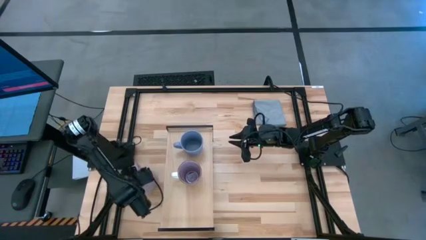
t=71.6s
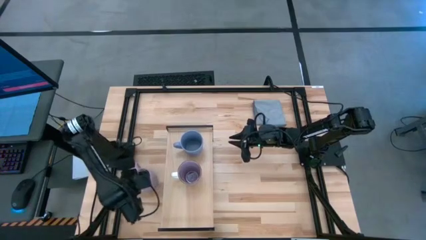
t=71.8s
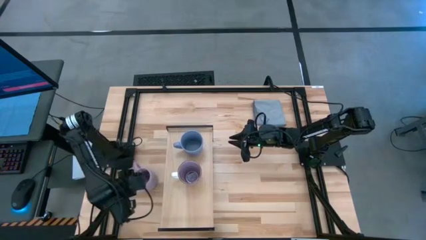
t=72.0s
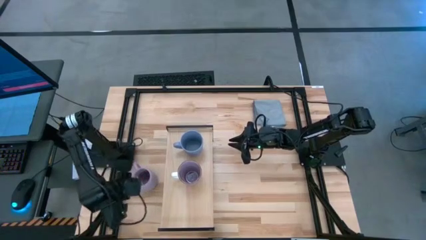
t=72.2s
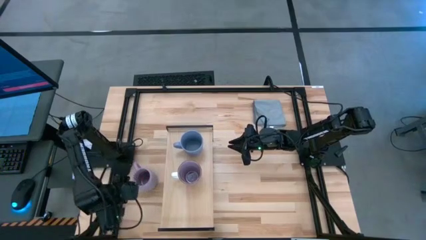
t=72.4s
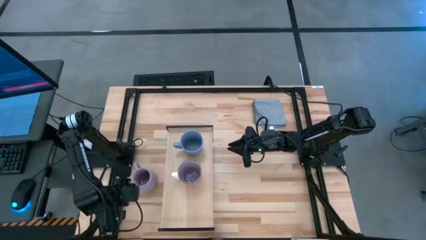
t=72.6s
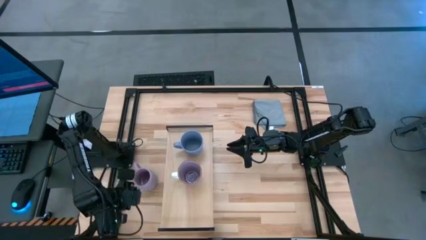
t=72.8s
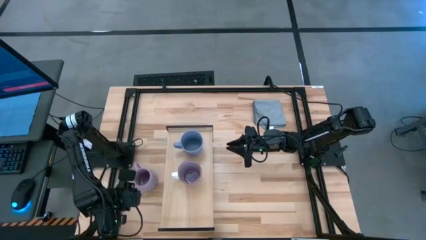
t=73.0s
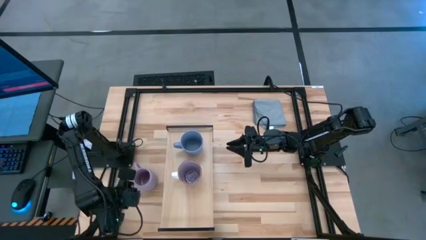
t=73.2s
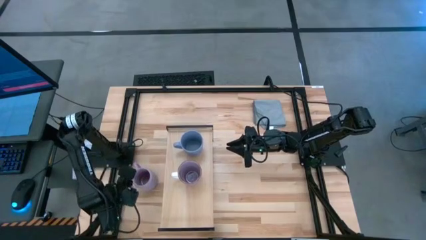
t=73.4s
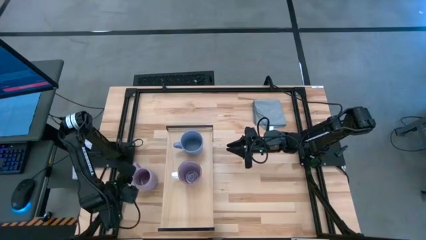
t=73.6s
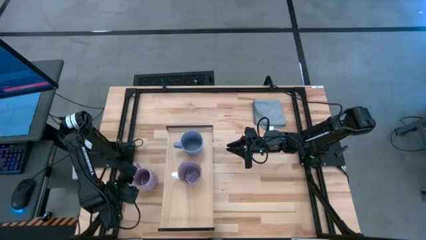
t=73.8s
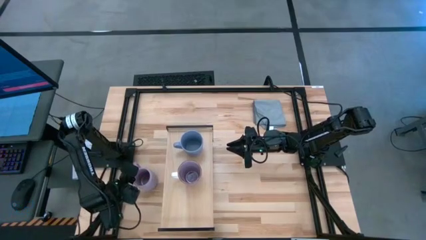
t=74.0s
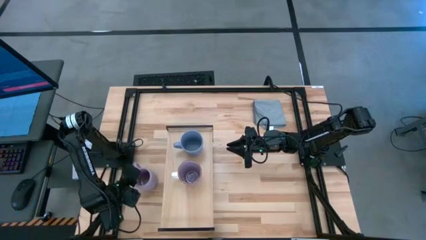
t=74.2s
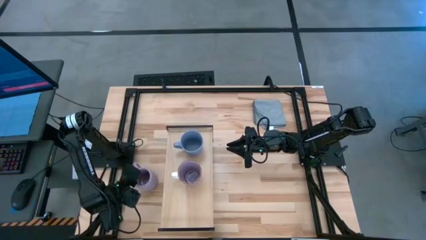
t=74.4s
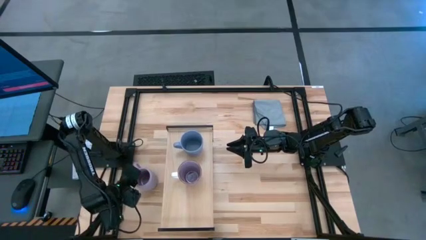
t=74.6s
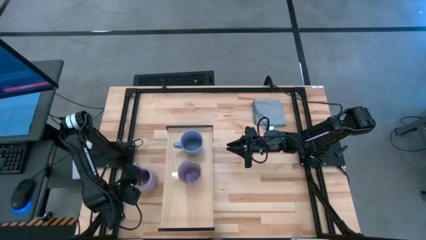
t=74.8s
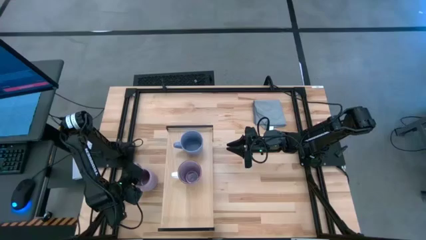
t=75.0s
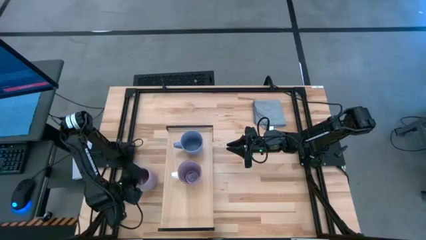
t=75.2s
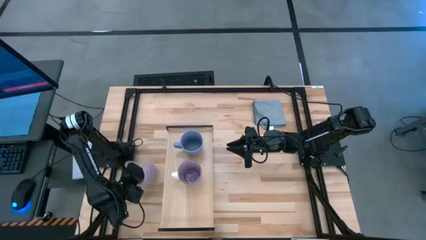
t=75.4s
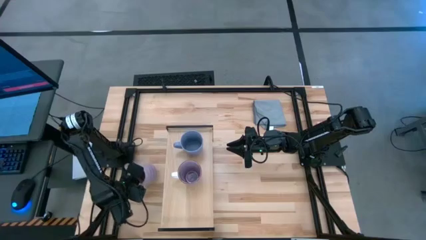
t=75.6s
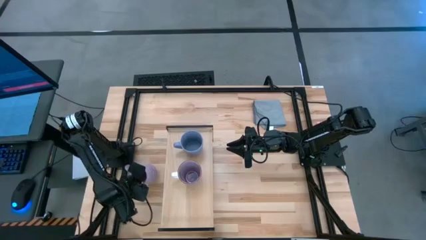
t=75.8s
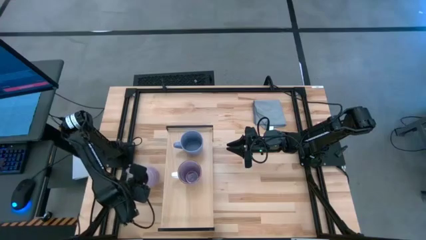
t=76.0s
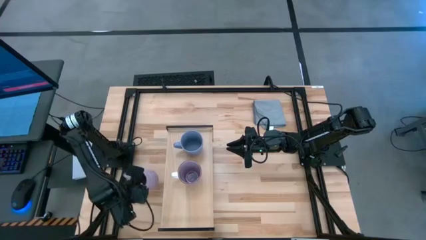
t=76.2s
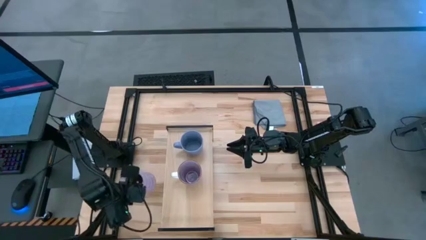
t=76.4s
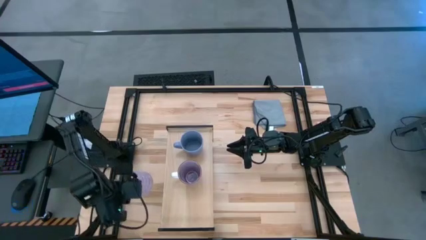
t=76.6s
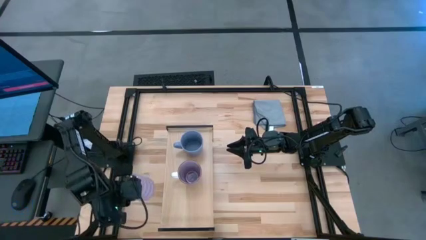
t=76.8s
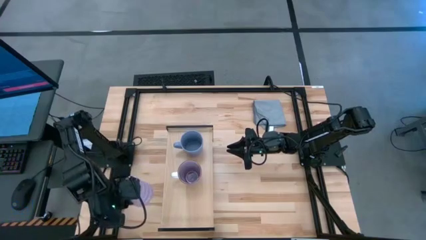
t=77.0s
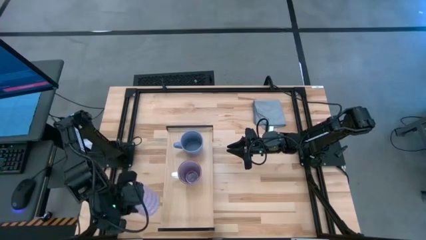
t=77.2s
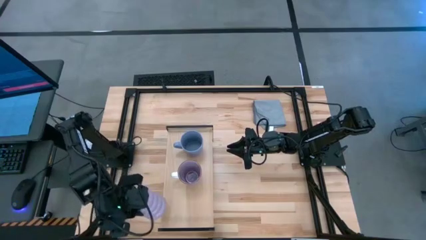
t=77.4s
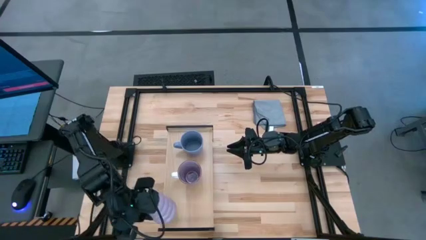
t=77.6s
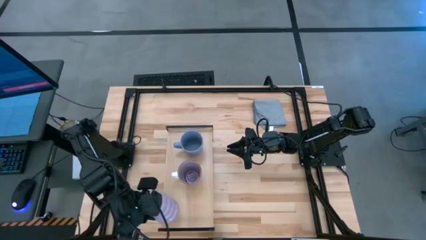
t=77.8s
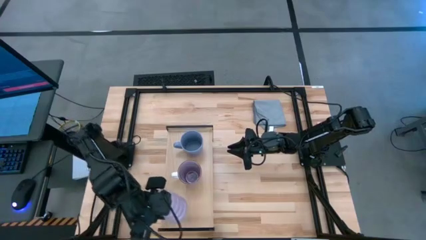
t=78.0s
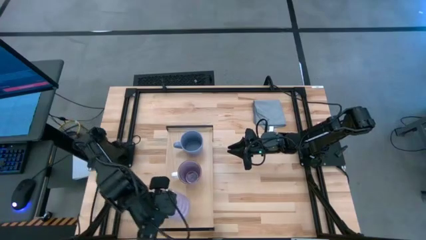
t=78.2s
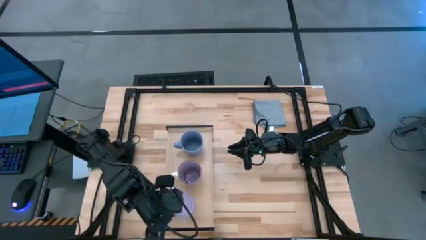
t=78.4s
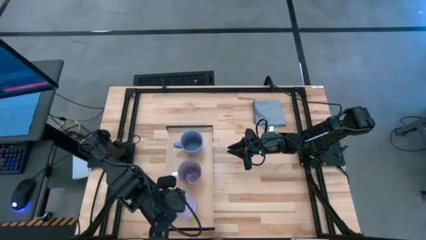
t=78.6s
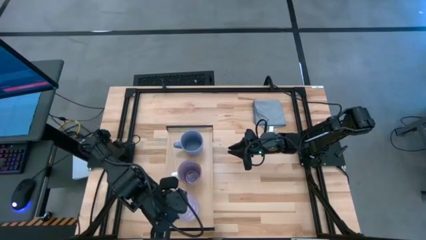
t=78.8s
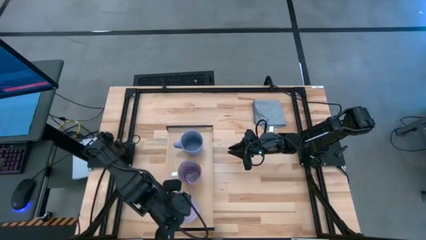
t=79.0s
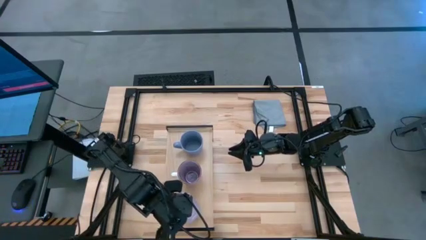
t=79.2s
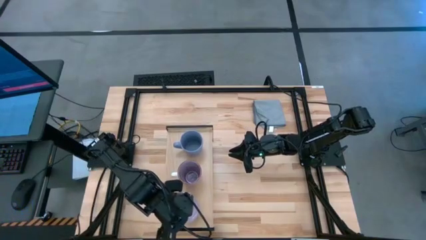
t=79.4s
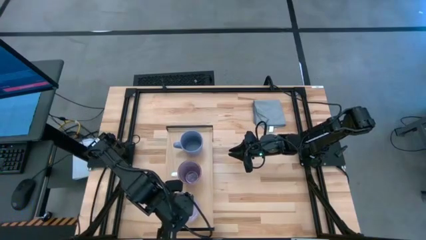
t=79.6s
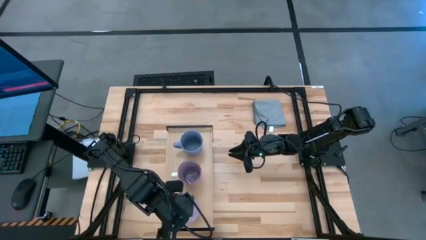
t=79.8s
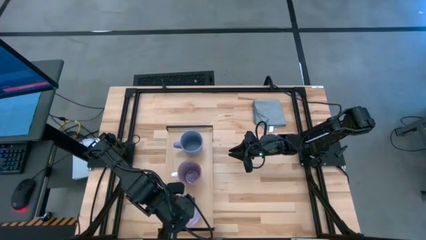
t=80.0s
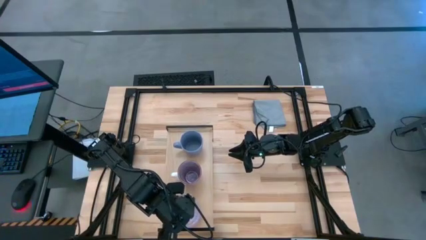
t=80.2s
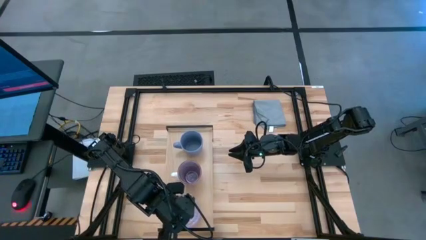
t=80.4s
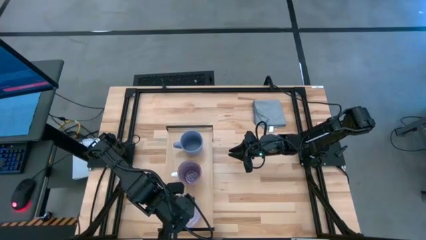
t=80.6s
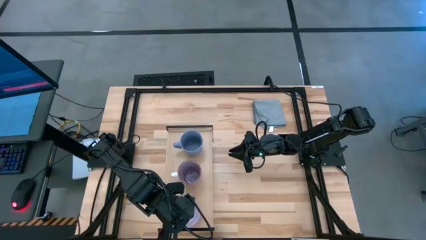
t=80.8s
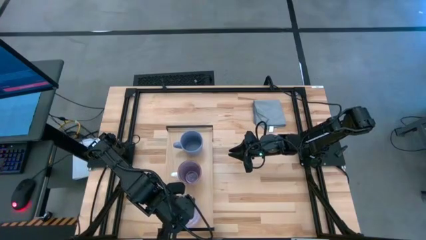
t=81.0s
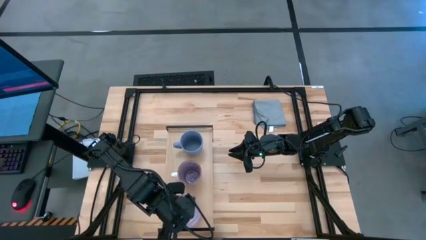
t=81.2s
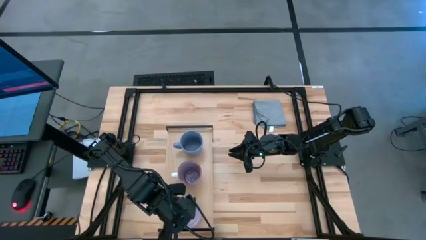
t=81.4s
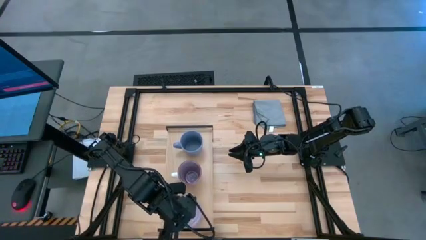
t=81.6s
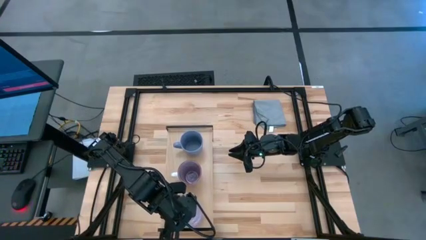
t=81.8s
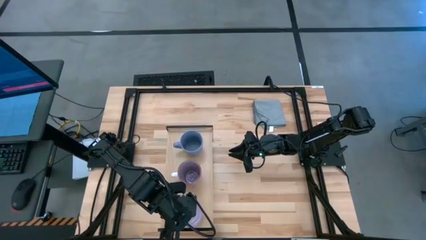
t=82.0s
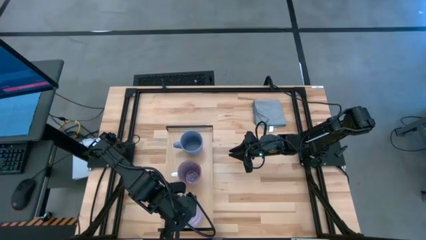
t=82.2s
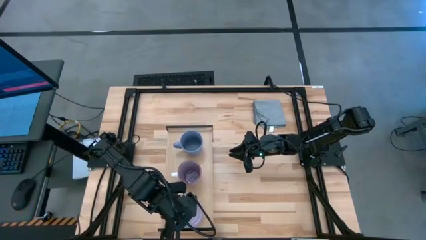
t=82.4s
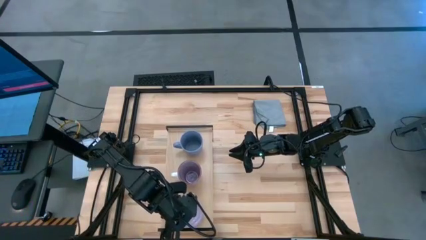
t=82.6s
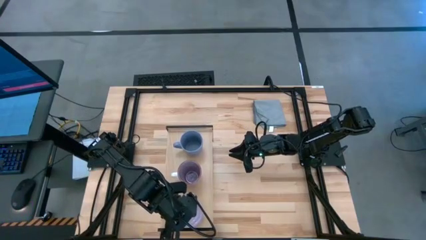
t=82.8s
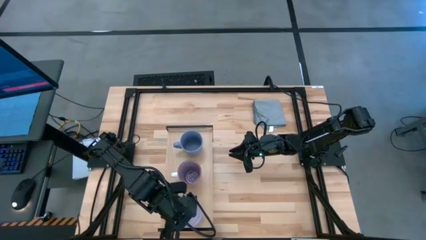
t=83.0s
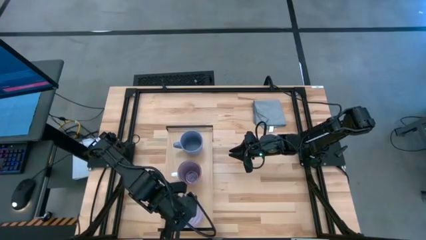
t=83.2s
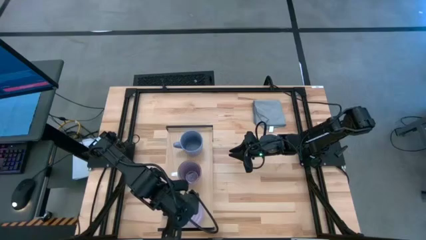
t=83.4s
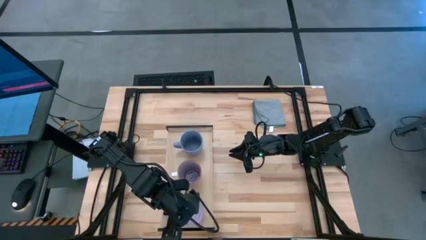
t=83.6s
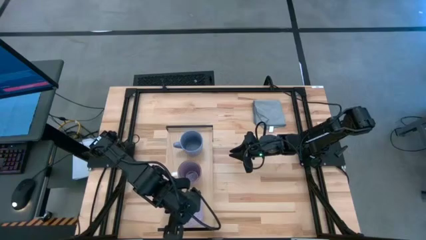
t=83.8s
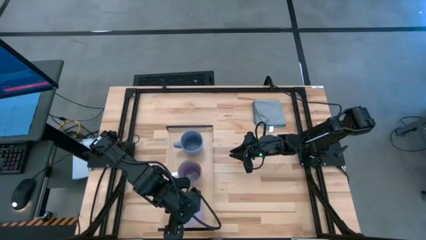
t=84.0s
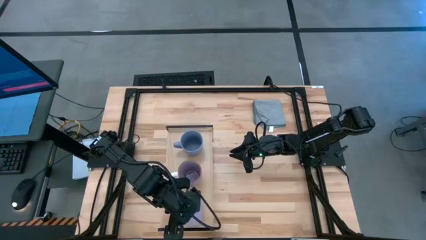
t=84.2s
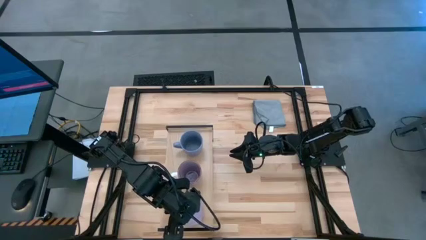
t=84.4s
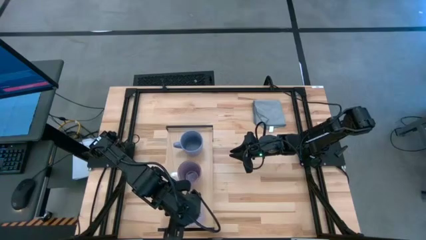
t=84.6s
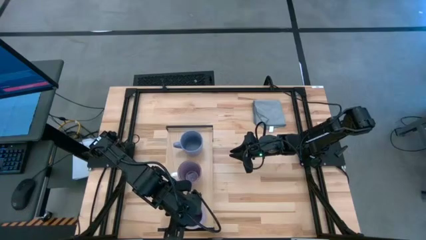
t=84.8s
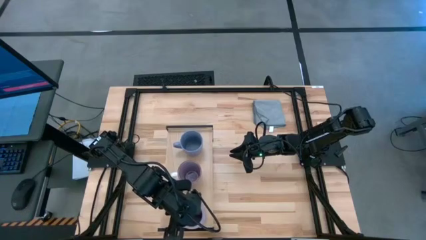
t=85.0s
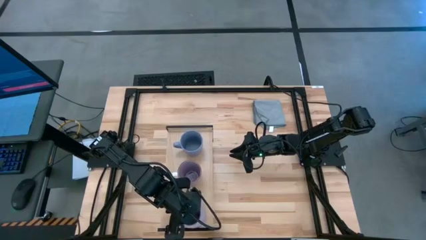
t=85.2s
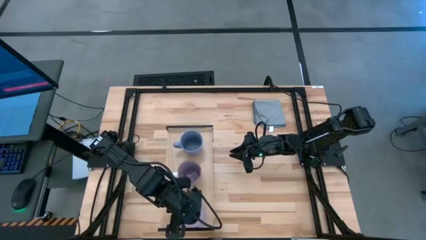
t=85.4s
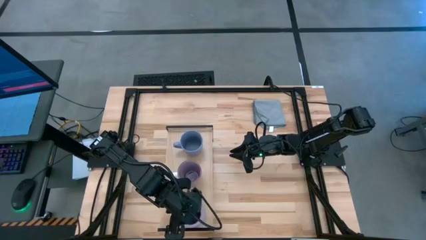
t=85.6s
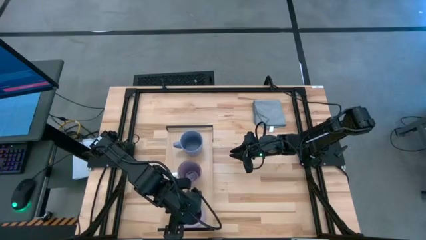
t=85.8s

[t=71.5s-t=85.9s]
Task: Stack small to large cups/mugs on shelf
Put the purple mug on the shelf
